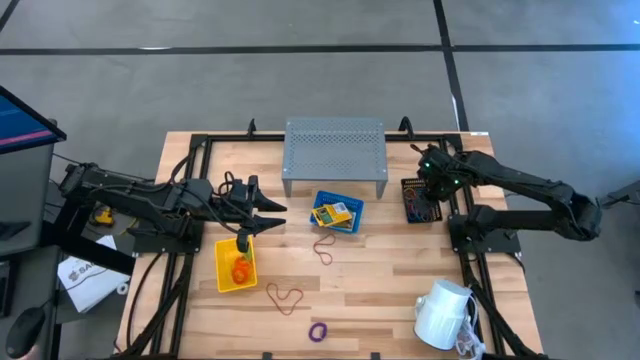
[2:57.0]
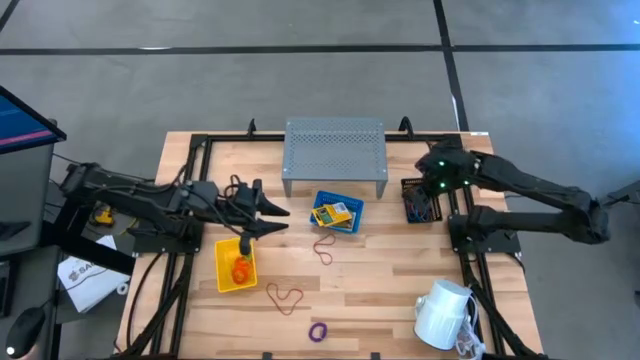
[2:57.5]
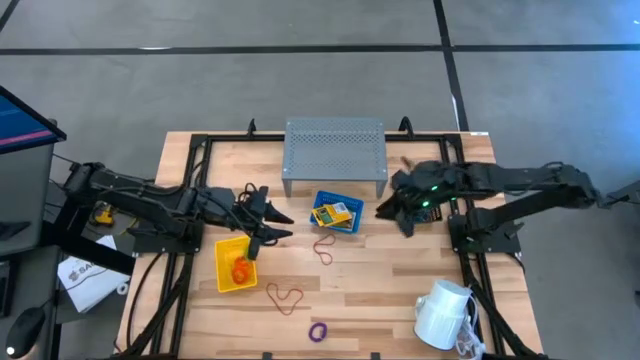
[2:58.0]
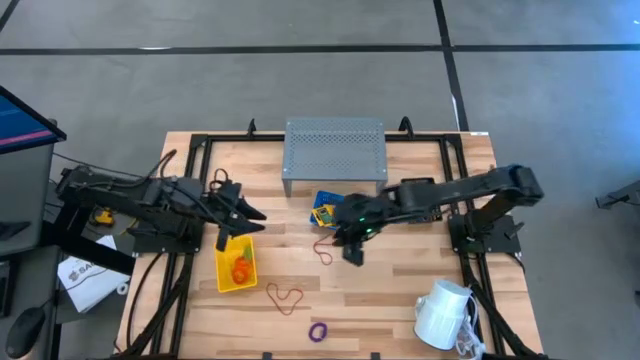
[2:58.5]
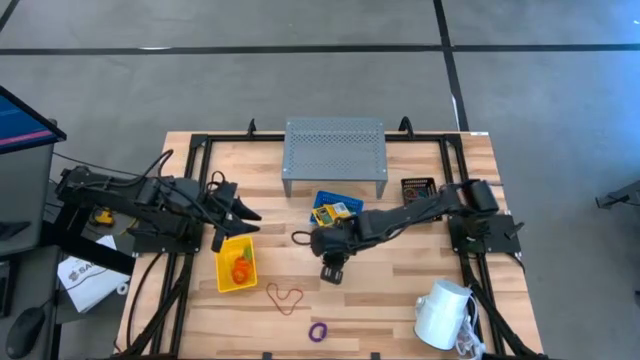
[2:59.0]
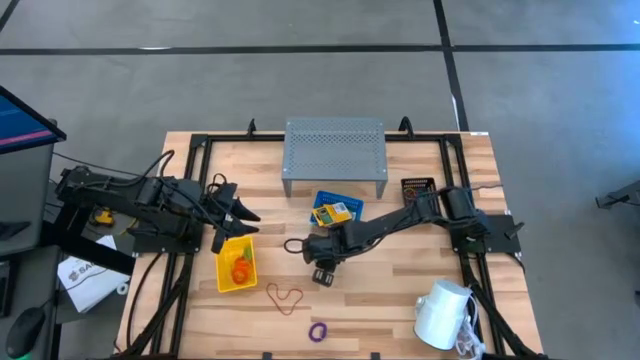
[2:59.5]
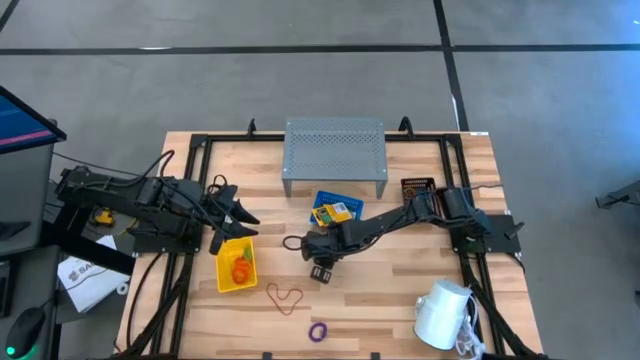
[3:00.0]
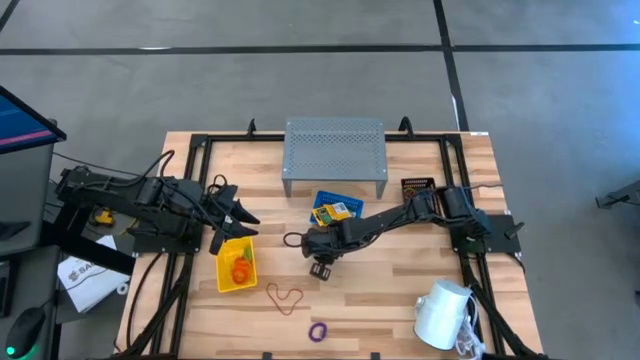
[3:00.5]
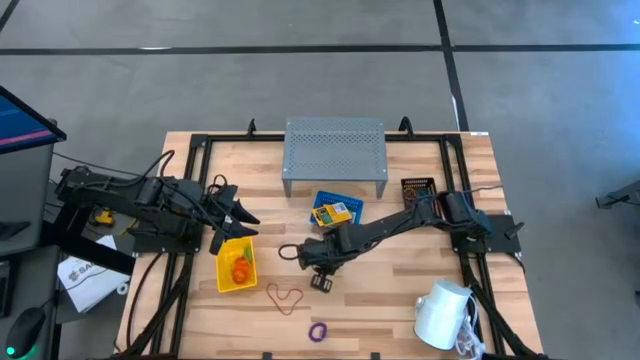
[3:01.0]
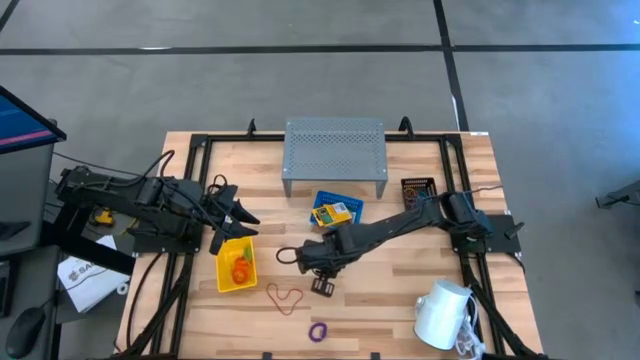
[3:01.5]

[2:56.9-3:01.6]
Task: Pick & Place Office Desk Supplies
Put the red rubber band into the black bin

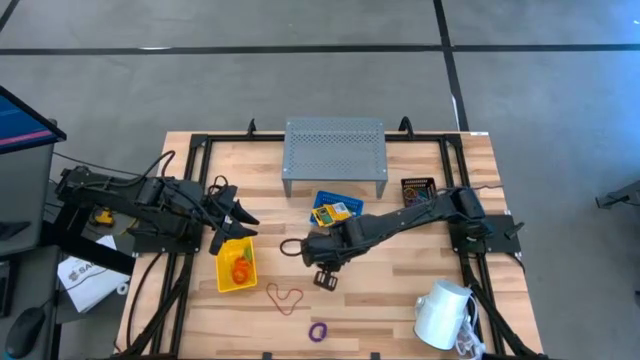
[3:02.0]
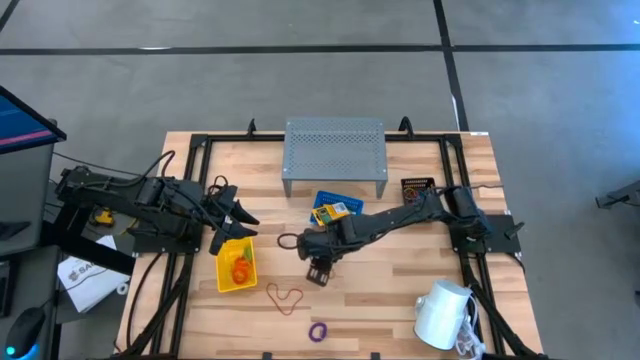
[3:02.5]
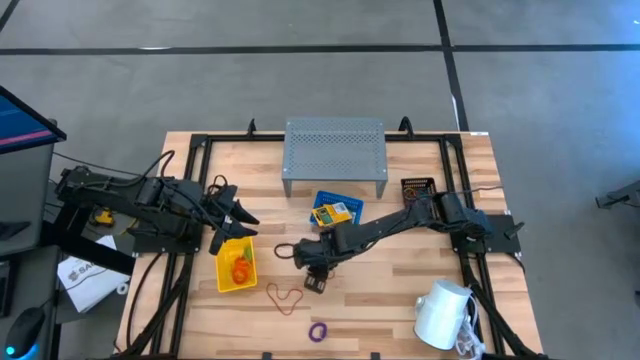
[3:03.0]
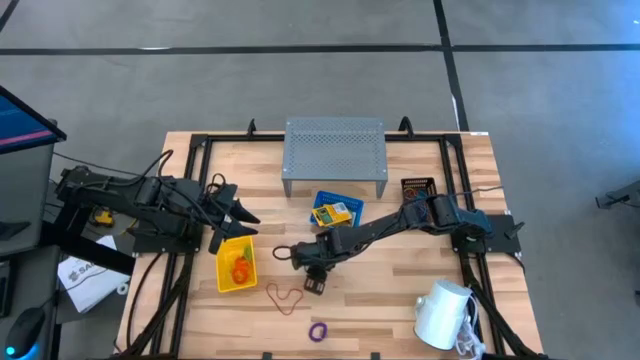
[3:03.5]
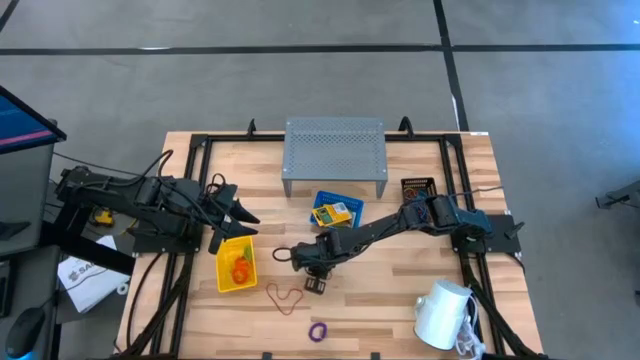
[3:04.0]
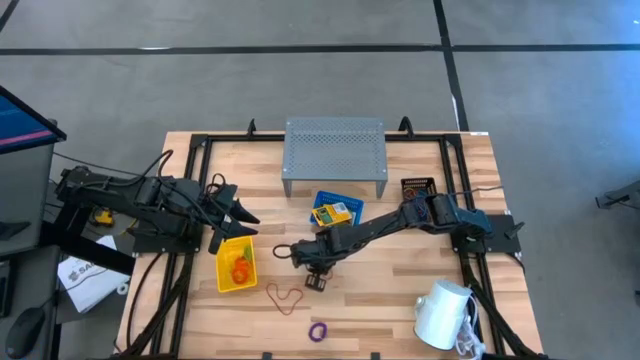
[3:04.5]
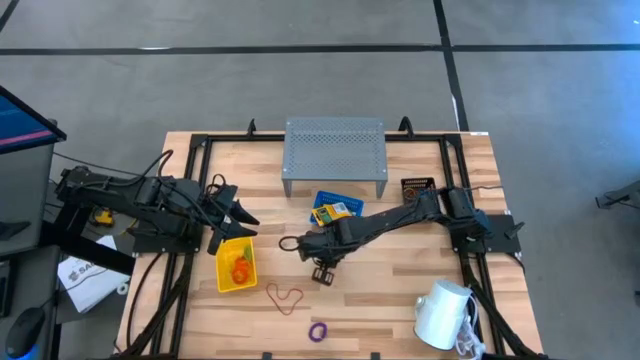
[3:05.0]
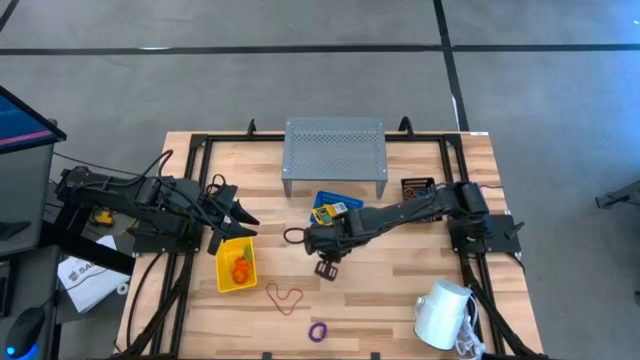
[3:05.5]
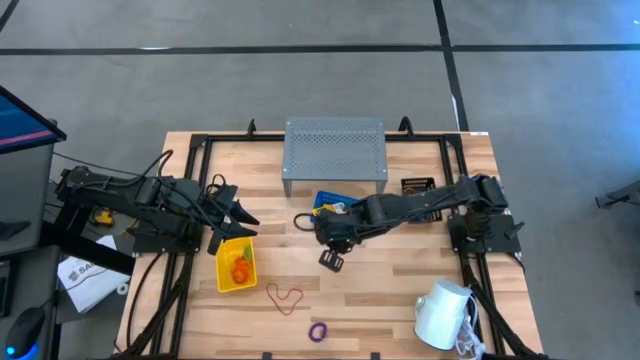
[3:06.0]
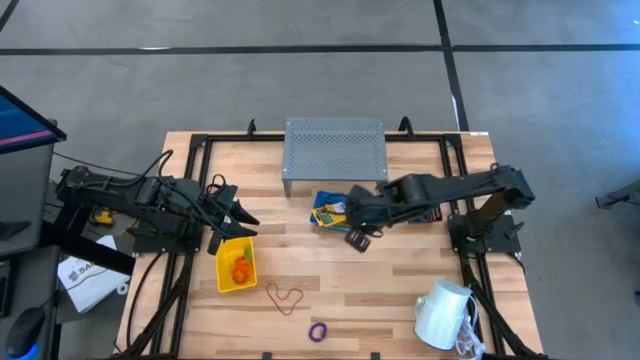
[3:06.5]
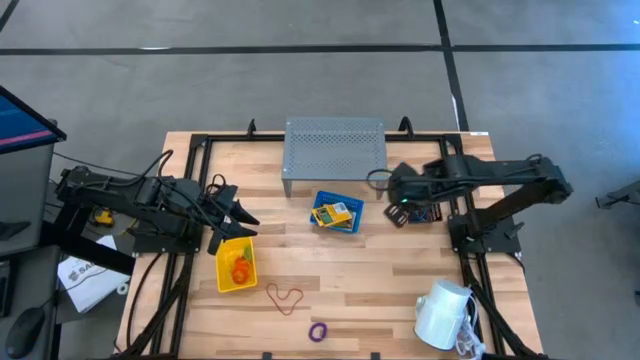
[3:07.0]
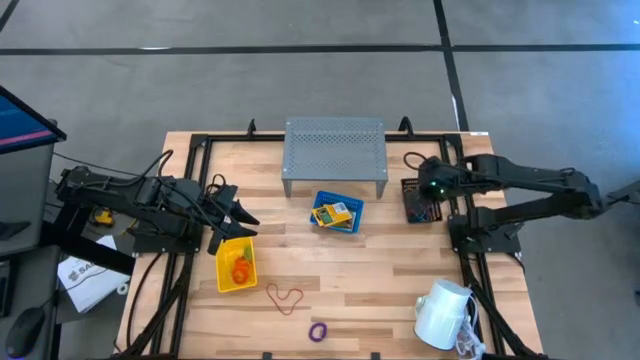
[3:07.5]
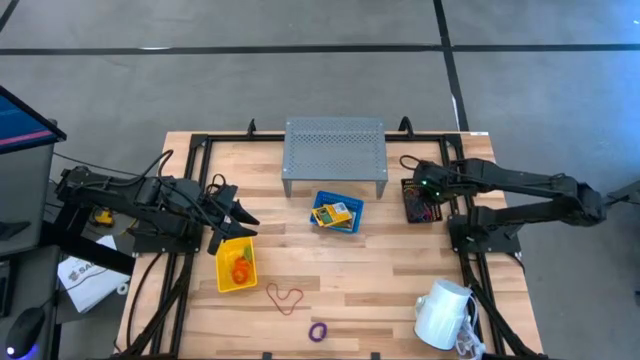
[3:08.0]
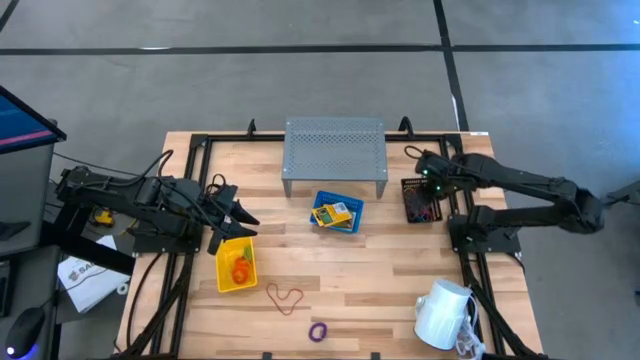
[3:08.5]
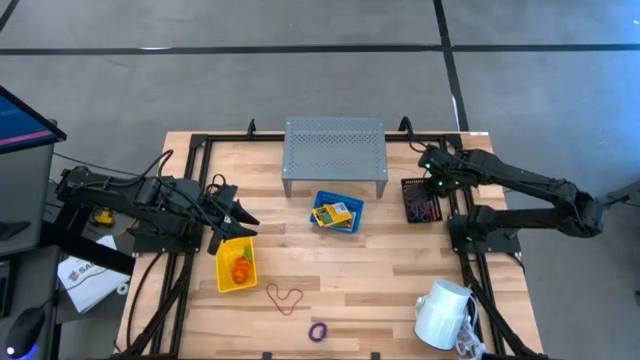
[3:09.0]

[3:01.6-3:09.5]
Put the red rubber band into the black bin

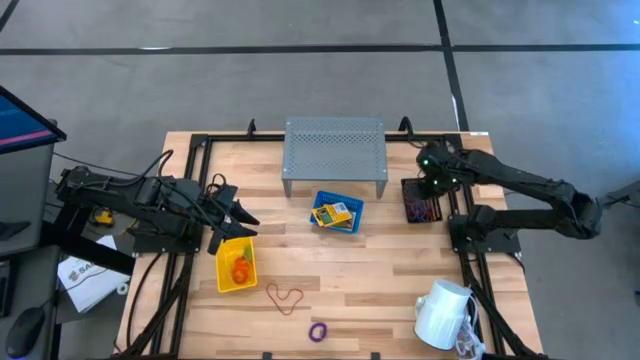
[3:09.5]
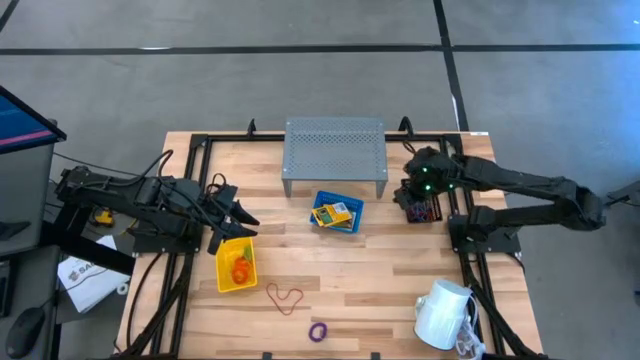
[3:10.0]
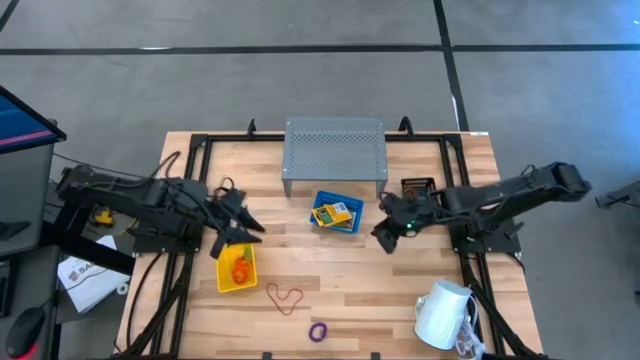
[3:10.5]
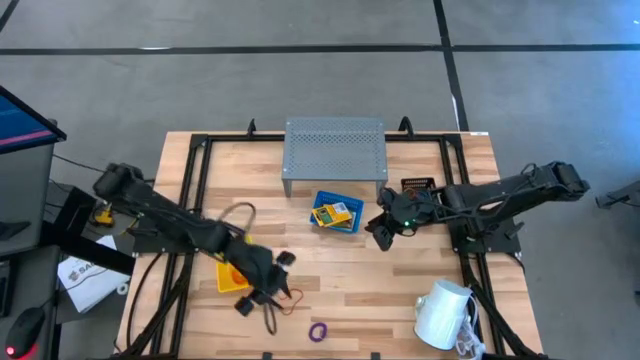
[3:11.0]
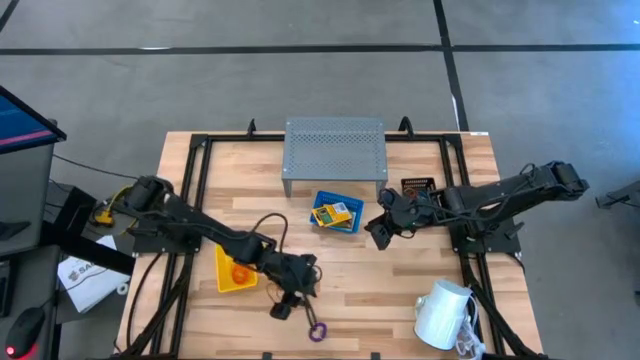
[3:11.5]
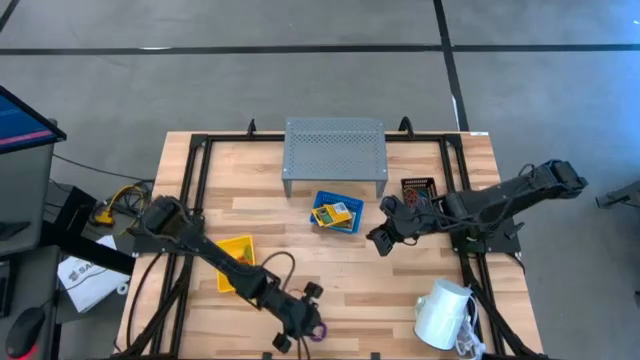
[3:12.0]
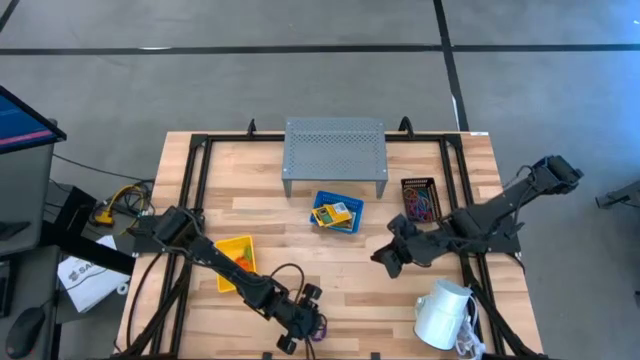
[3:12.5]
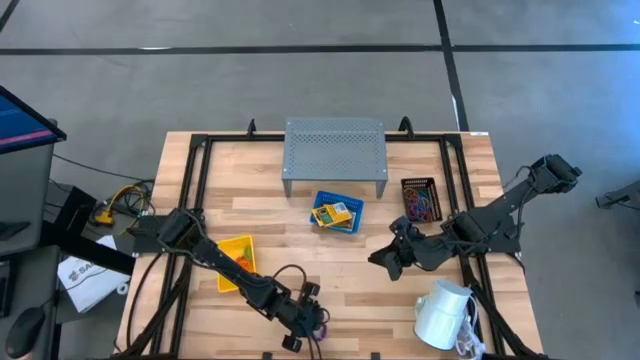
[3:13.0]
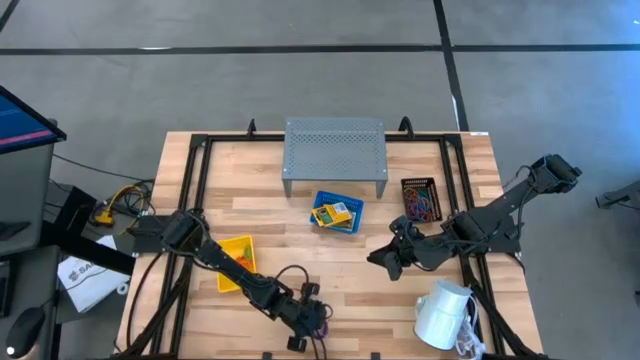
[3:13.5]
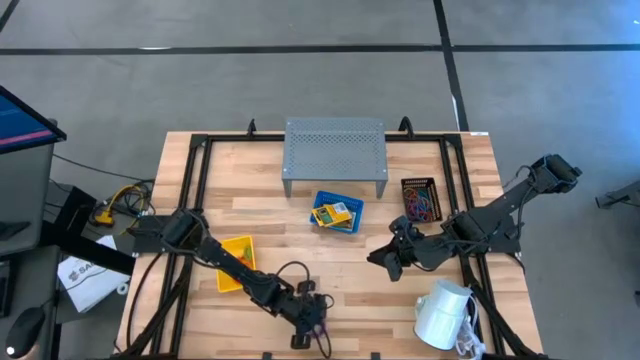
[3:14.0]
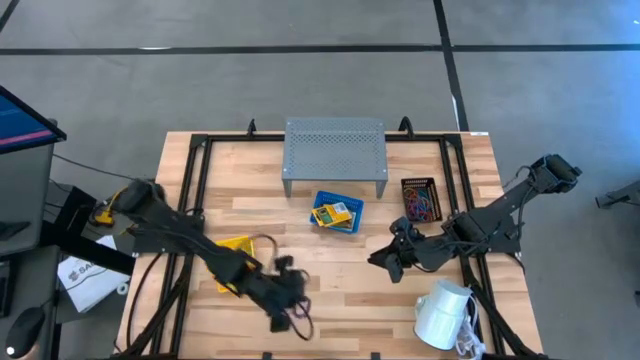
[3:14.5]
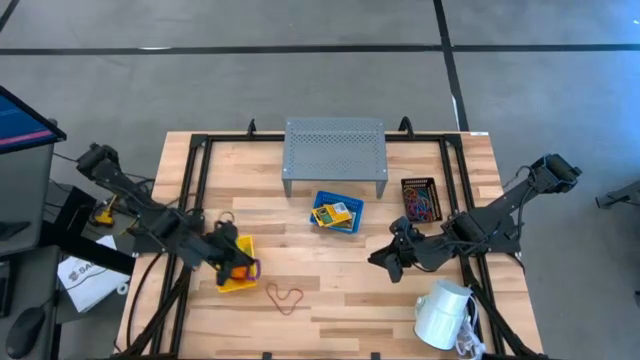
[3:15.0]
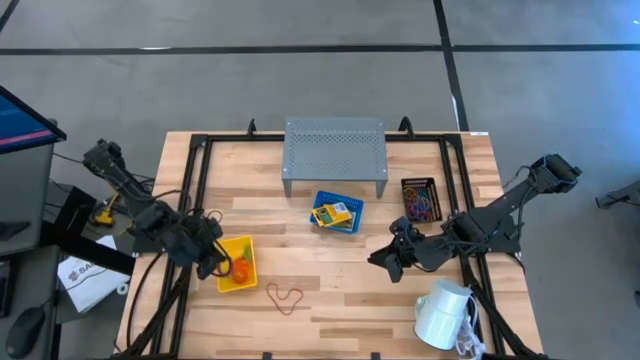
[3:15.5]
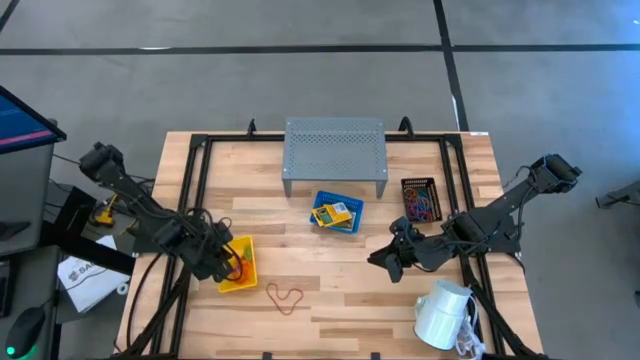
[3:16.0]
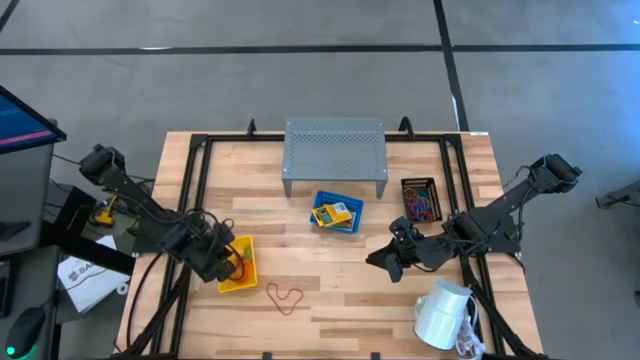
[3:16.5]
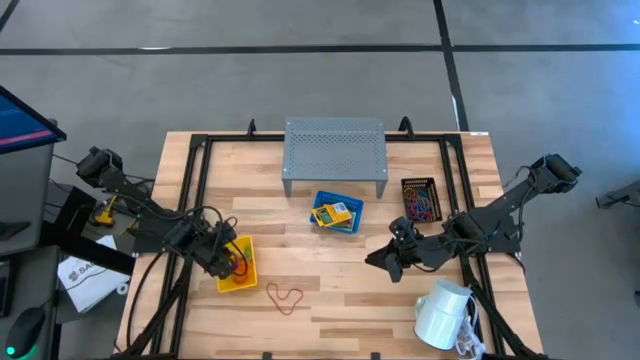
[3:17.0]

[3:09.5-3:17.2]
Put the violet spring keychain into the yellow bin

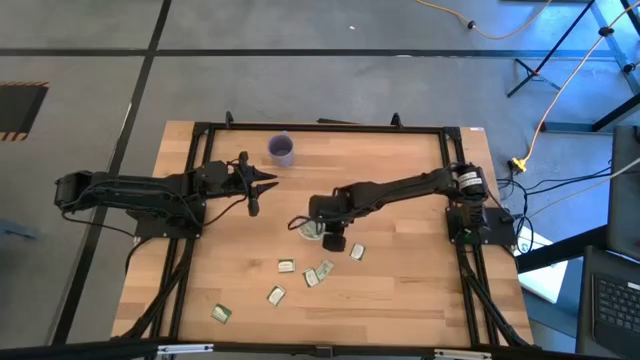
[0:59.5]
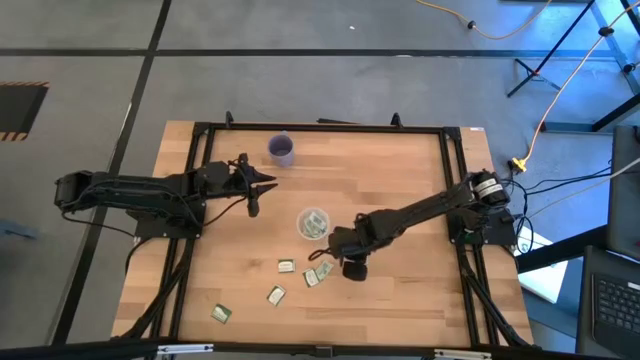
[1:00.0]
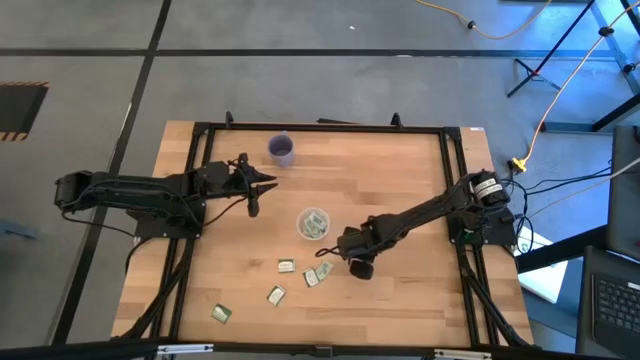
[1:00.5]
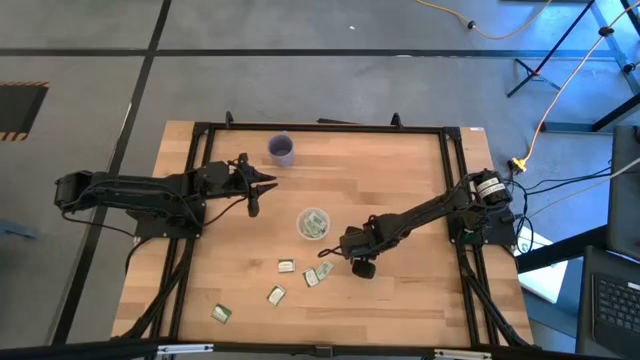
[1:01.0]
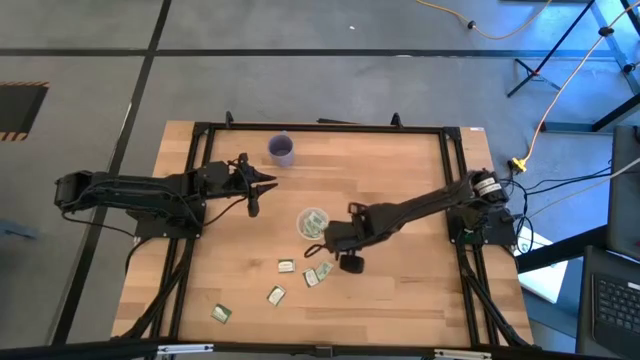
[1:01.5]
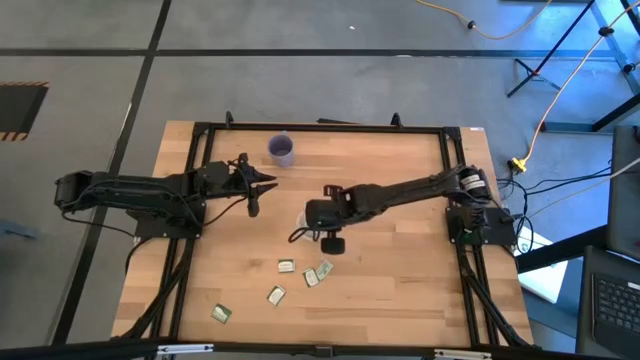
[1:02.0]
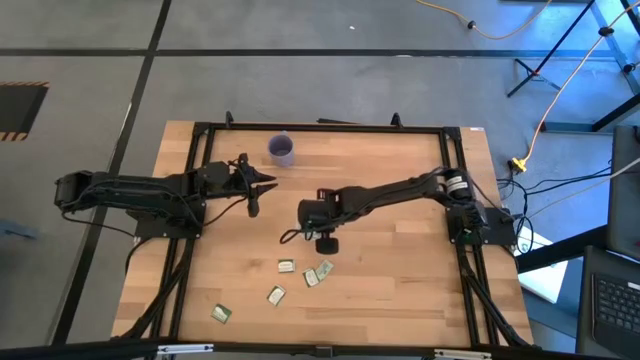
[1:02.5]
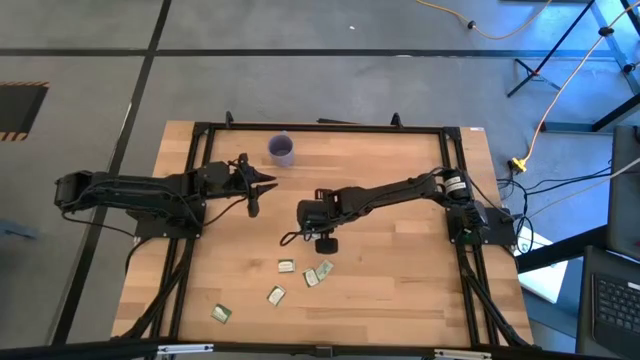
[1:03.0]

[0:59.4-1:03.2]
Task: Pick and place Stevia / Truvia into bins
Put the truvia packet into the transparent container
